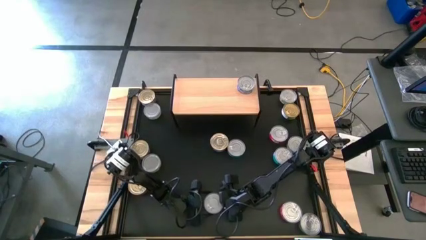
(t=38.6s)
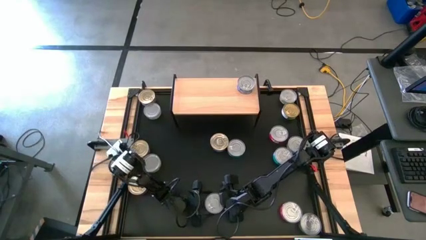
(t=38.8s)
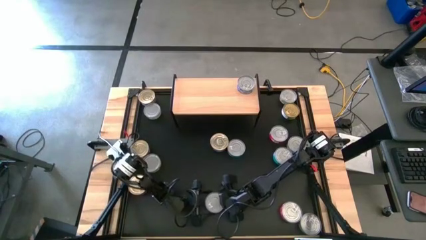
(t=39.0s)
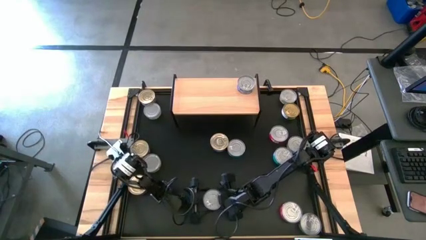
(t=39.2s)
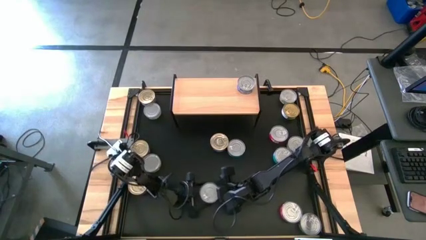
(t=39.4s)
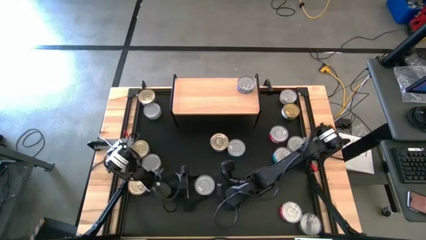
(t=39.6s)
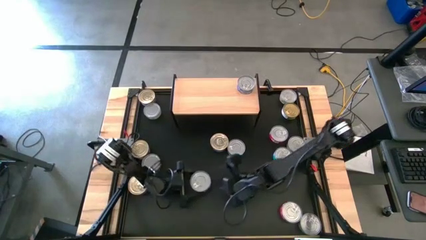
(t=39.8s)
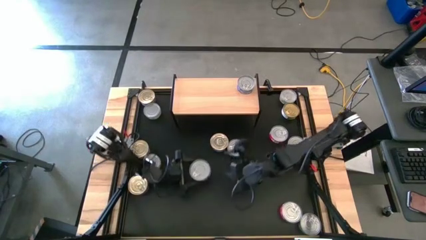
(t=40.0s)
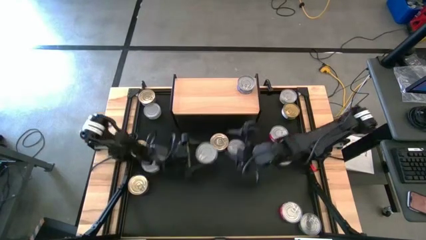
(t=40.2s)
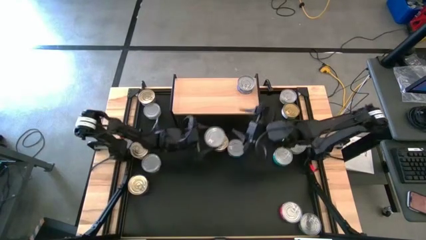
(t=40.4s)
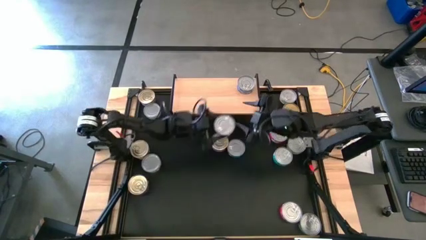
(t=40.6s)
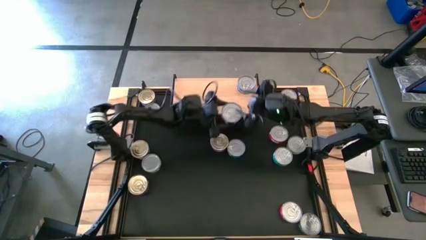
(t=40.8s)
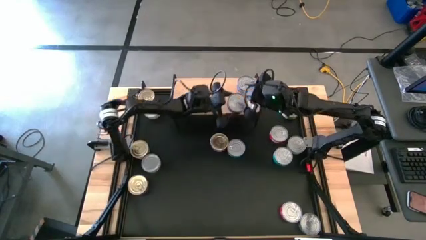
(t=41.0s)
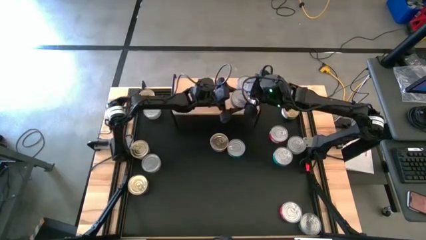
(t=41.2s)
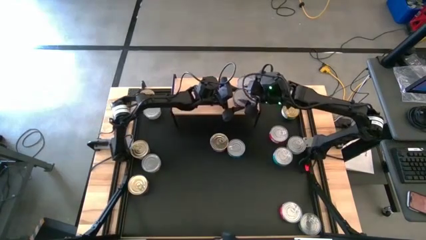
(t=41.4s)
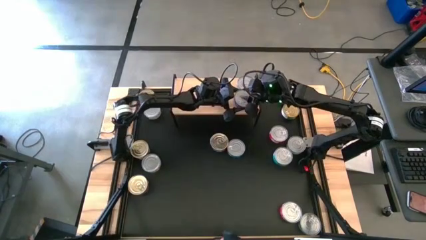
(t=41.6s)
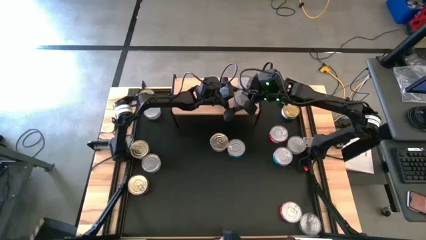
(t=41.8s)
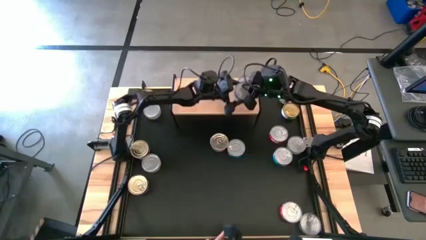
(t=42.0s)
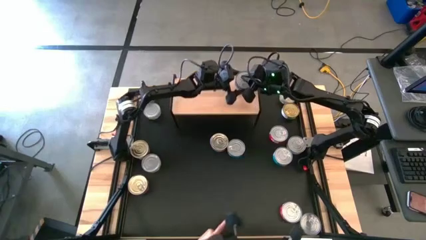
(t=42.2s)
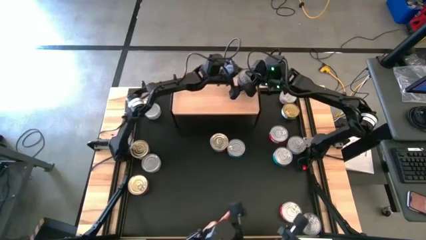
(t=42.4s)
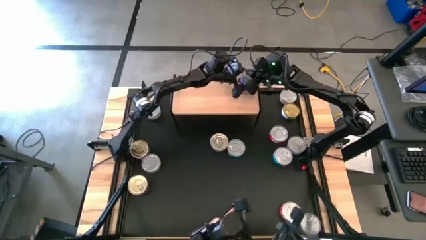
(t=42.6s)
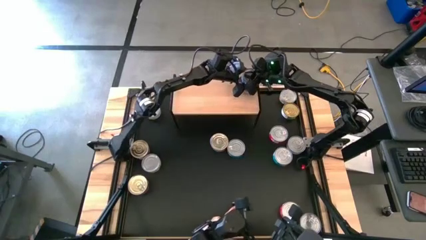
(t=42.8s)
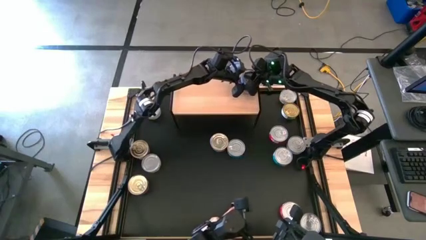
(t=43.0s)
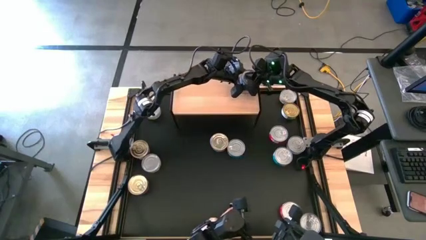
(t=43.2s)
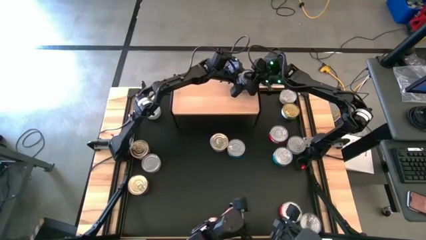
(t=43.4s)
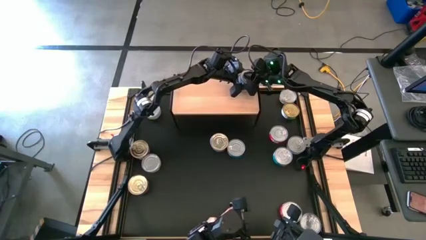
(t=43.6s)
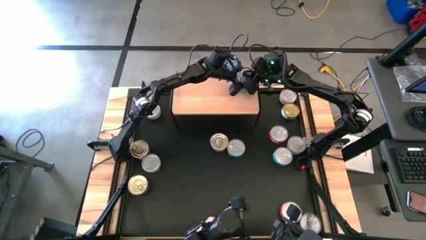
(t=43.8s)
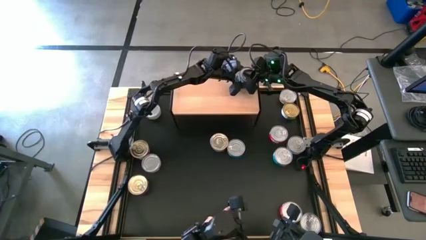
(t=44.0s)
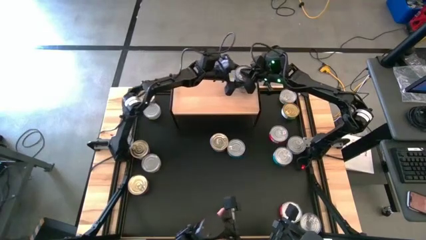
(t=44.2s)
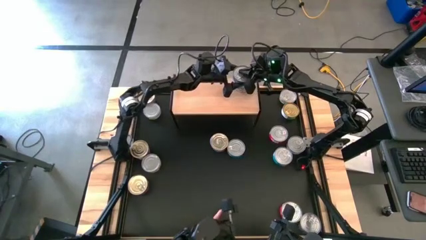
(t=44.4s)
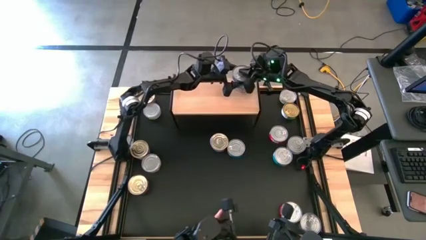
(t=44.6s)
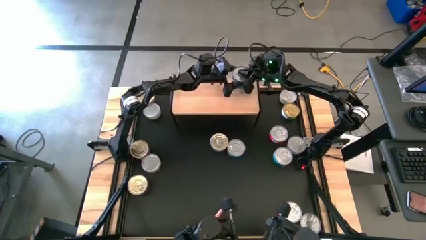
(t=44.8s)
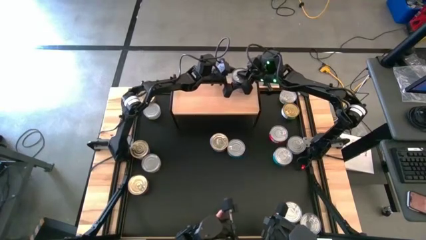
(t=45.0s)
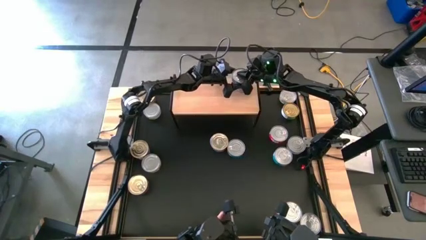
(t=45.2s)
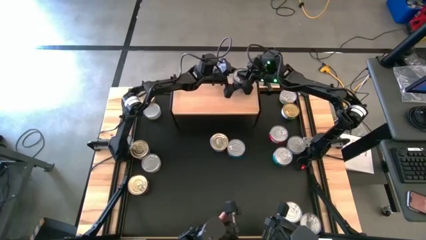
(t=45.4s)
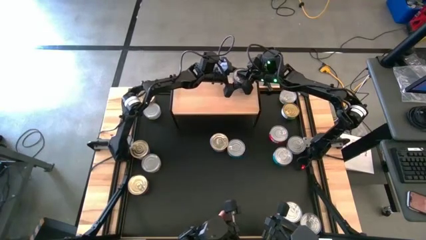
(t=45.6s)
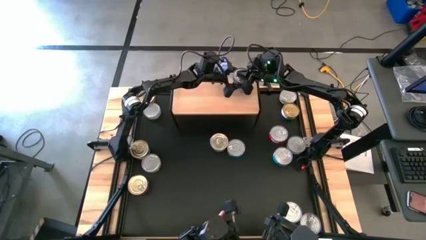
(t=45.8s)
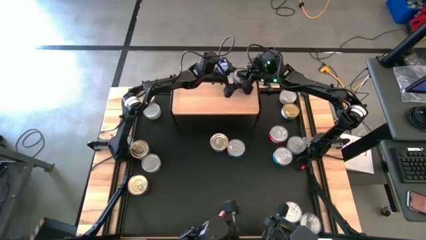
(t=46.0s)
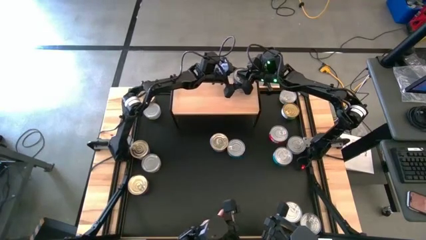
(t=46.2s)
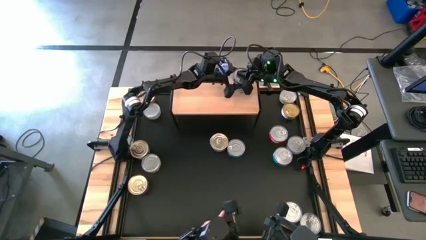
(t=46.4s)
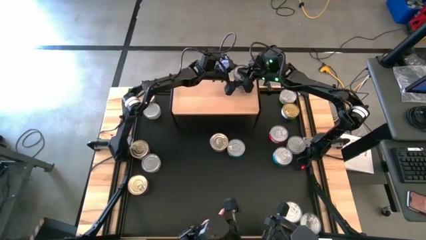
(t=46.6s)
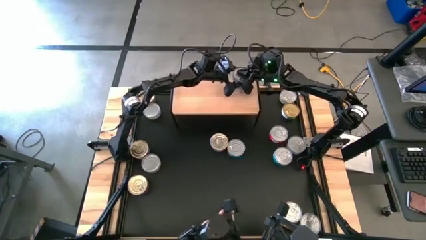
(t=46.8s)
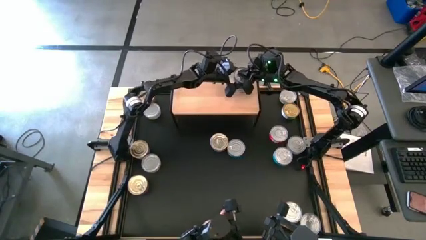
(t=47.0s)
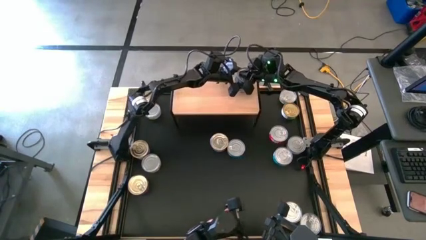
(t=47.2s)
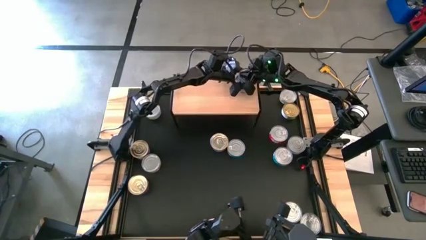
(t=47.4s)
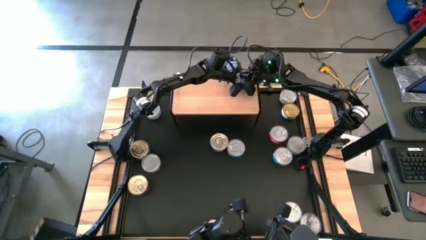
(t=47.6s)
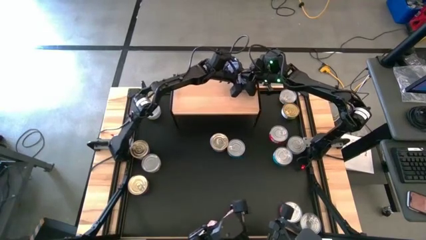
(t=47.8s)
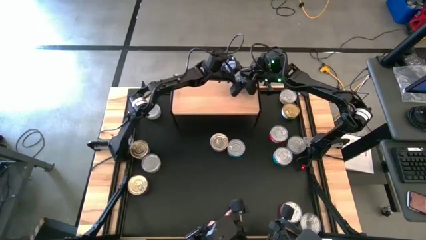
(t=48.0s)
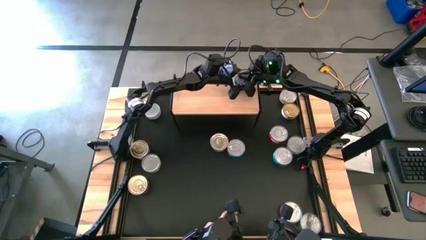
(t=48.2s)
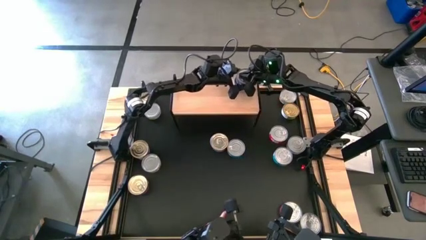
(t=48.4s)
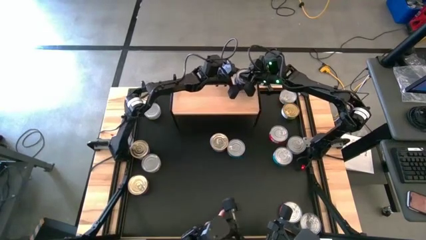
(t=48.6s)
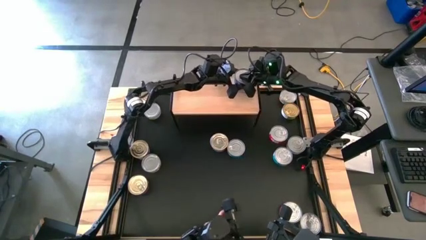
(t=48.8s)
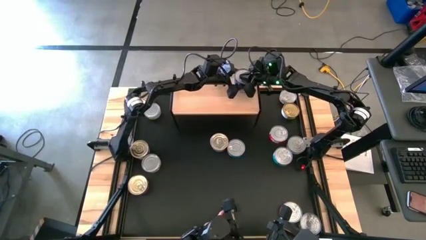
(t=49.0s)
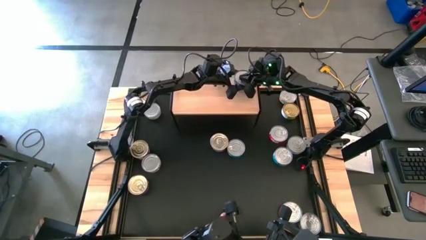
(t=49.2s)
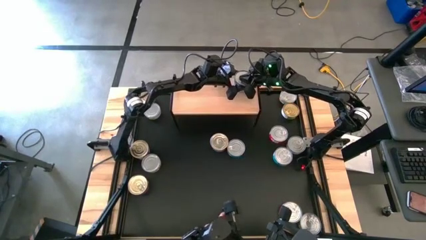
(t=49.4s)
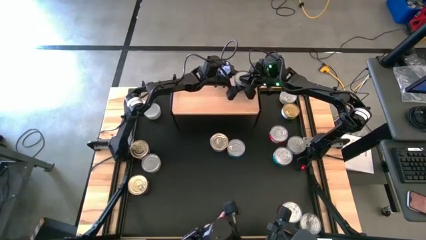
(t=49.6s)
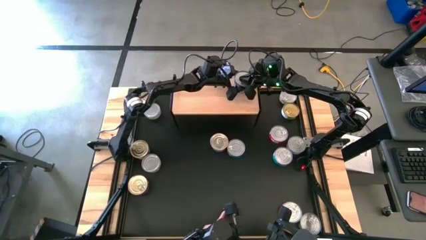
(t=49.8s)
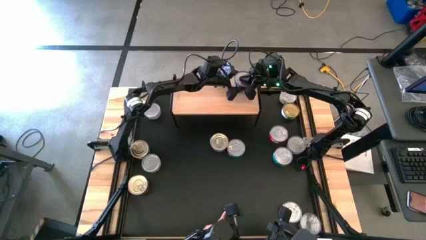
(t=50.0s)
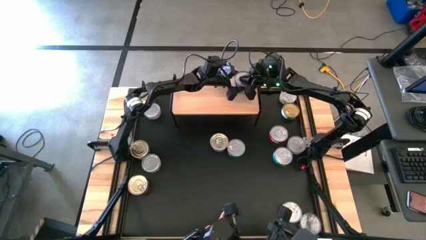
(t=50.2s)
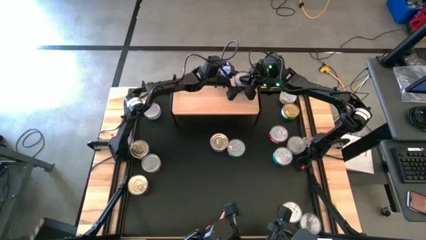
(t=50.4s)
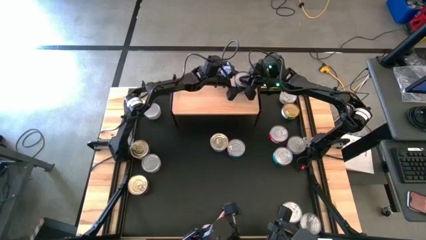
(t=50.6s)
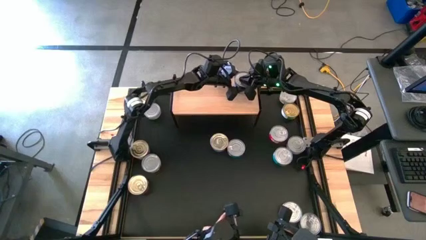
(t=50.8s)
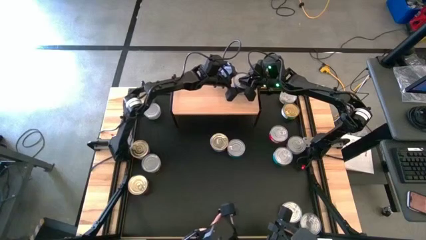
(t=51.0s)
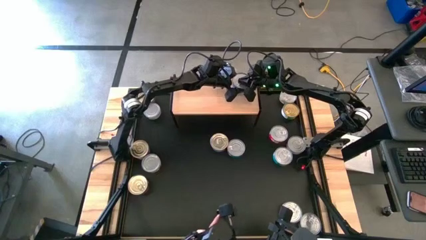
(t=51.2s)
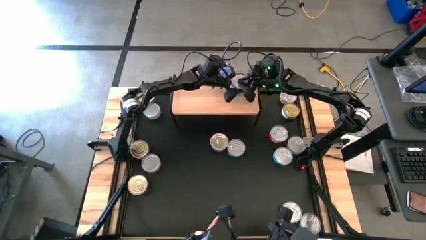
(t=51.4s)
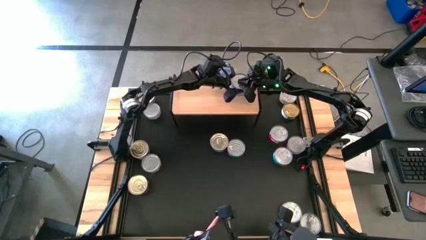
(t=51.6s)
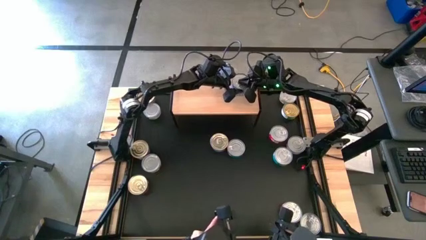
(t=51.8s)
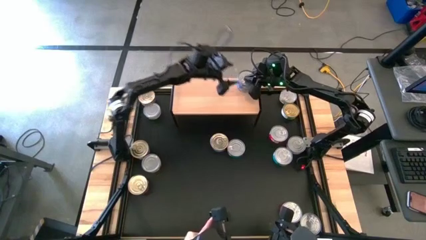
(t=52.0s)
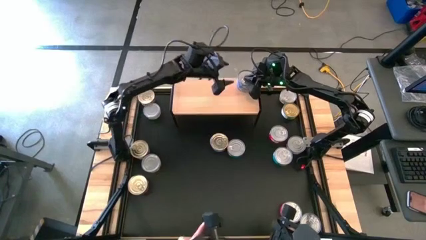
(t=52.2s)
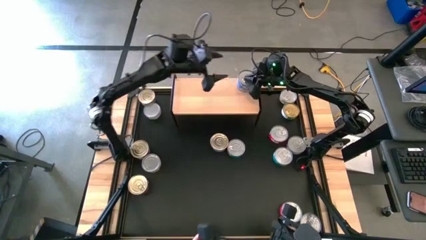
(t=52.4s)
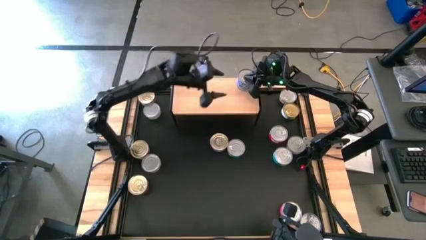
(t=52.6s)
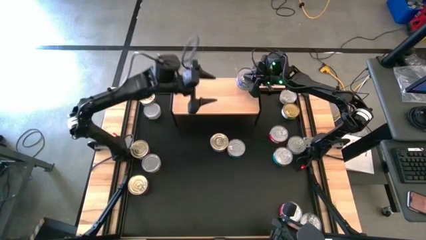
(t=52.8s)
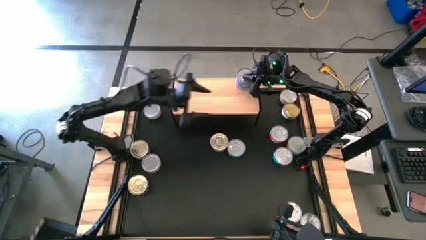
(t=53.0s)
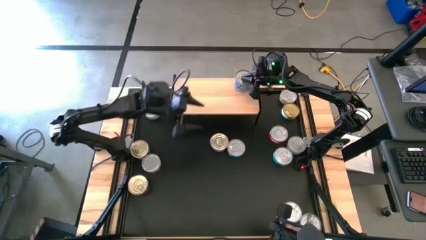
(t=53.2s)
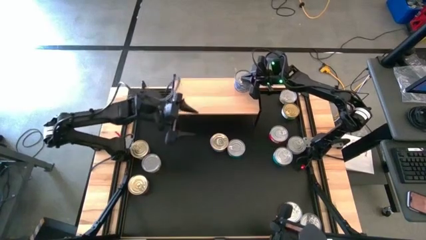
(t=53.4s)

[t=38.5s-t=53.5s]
Task: Stack canned seafood by type on shelf
Stack the blue tuna can on top of the other blue tuna can on the shelf
